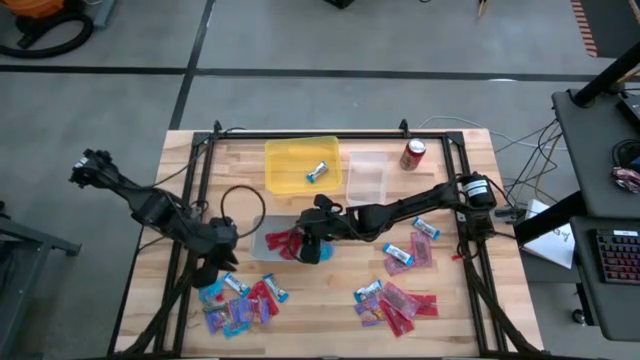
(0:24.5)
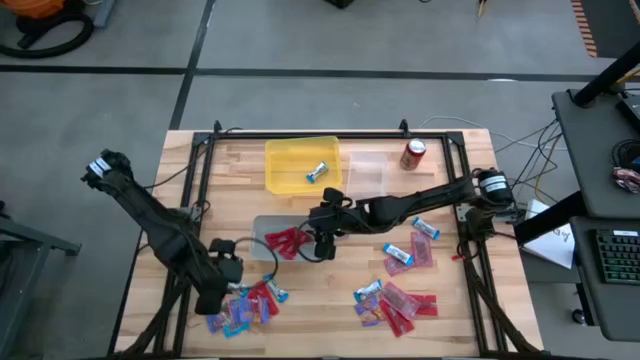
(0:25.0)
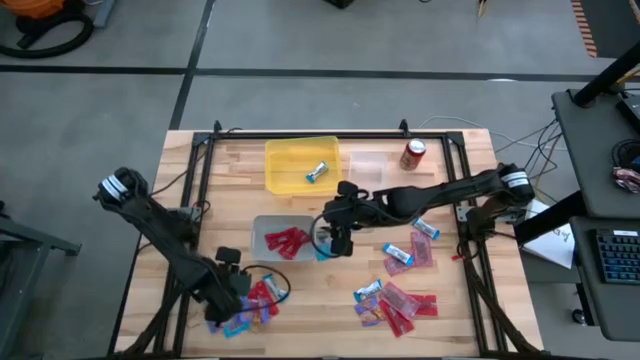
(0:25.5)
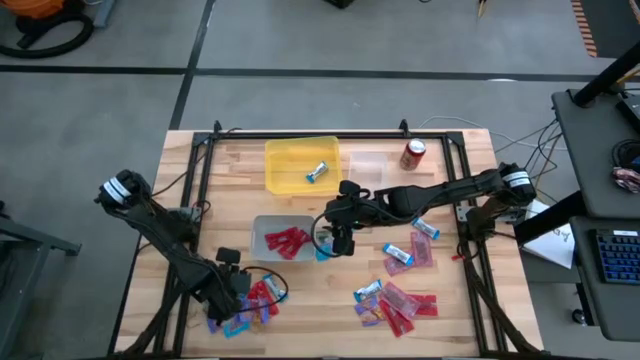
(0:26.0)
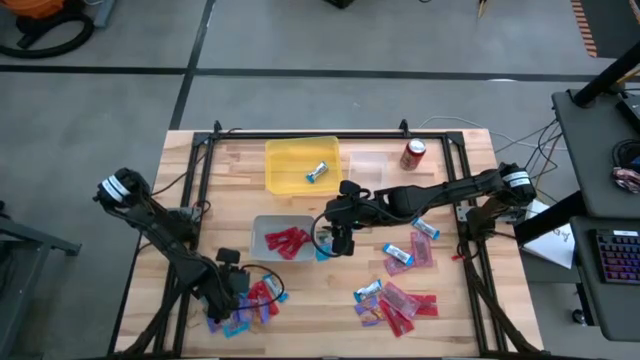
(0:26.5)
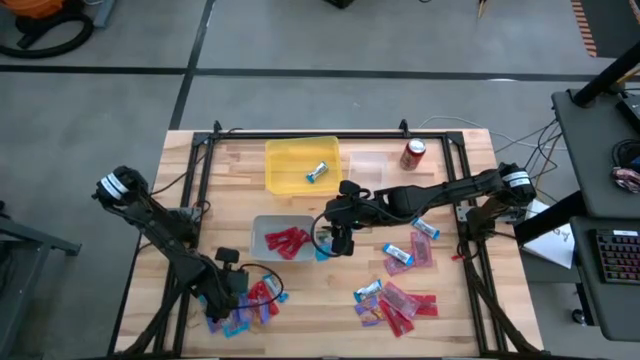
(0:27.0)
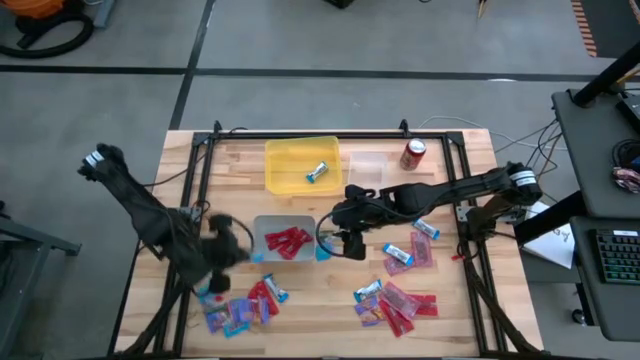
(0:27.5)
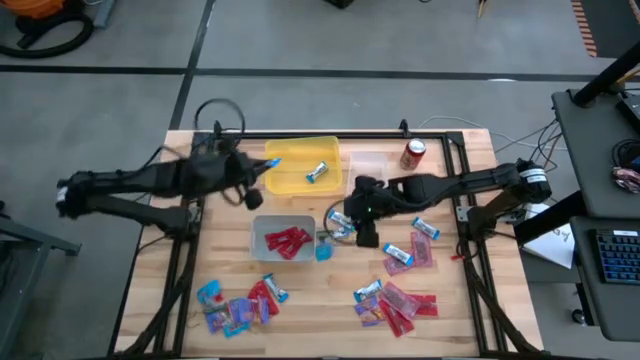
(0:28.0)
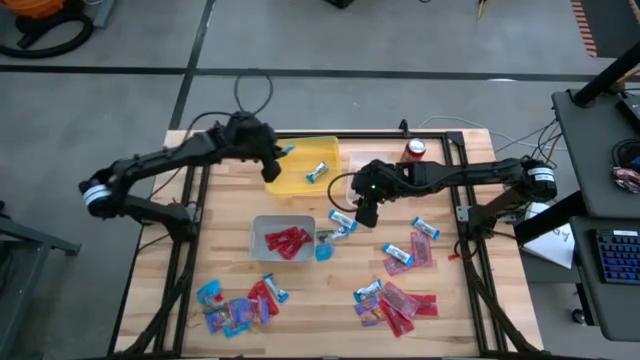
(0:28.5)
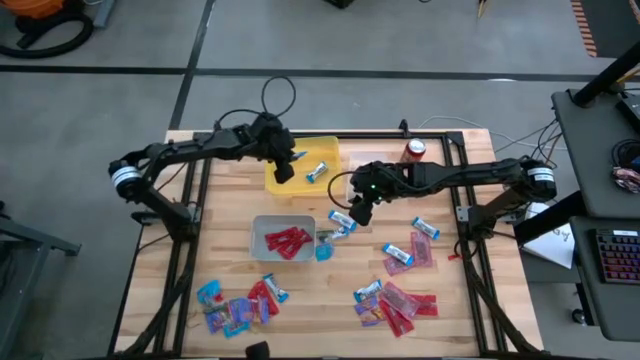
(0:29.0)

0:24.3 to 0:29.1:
Task: Sort candy
Put the white candy into the yellow bin

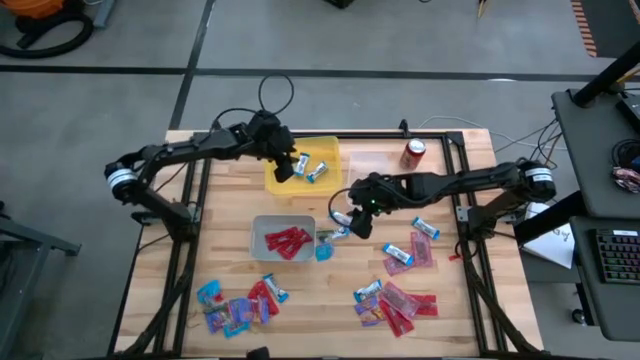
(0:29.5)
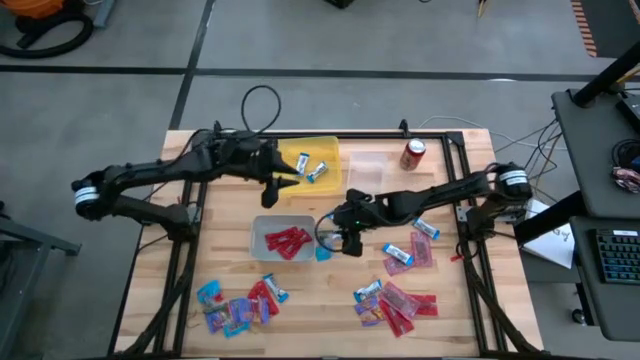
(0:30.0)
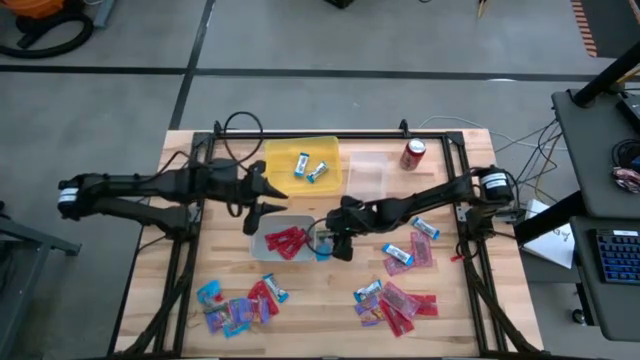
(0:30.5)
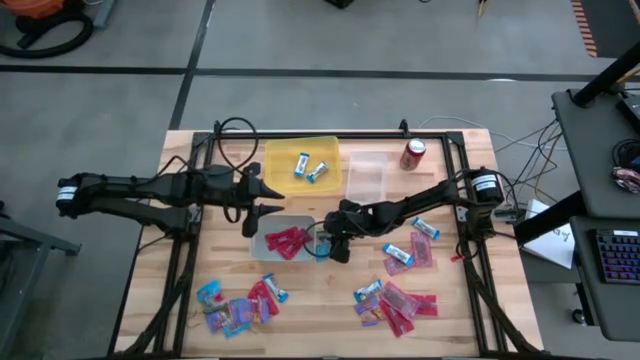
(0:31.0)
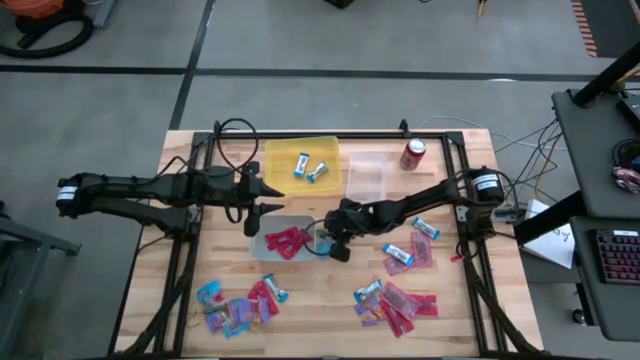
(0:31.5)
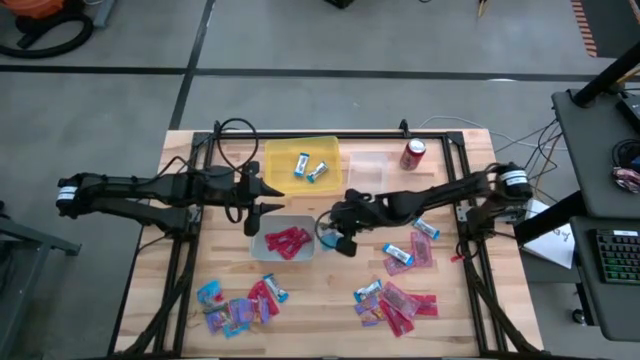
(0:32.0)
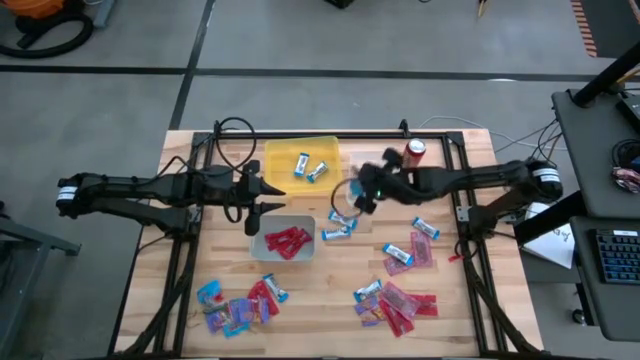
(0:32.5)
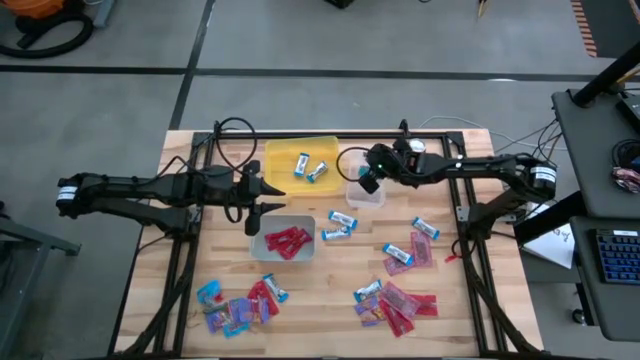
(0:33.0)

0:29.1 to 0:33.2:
Put the blue candy into the transparent bin

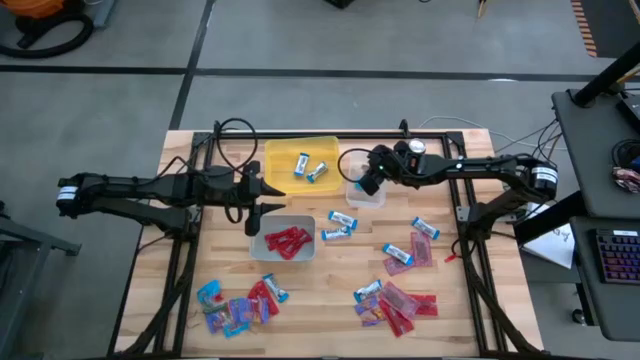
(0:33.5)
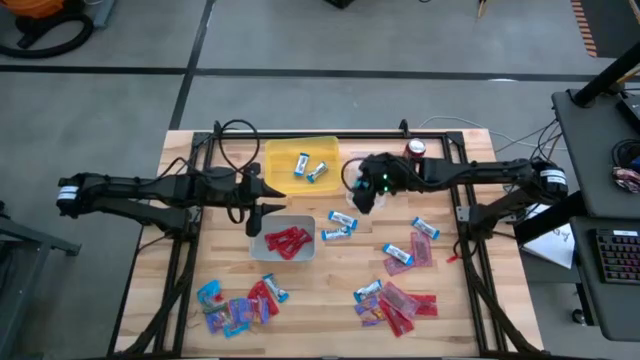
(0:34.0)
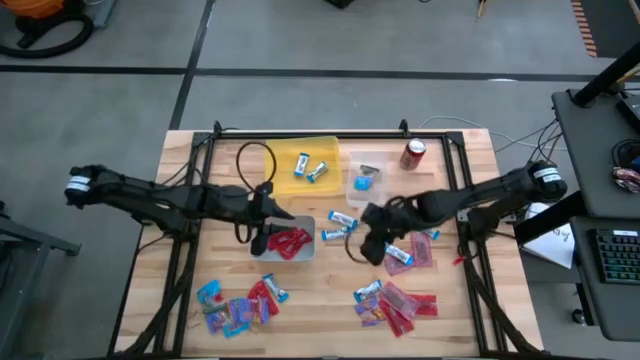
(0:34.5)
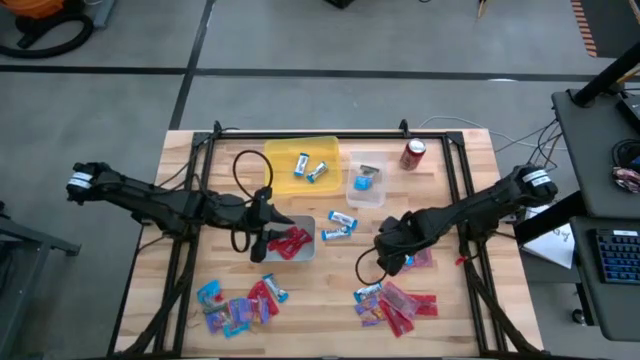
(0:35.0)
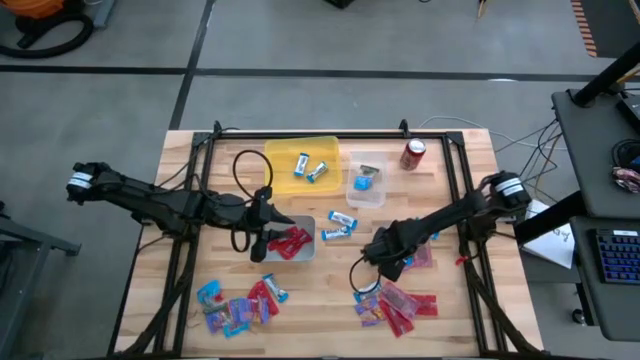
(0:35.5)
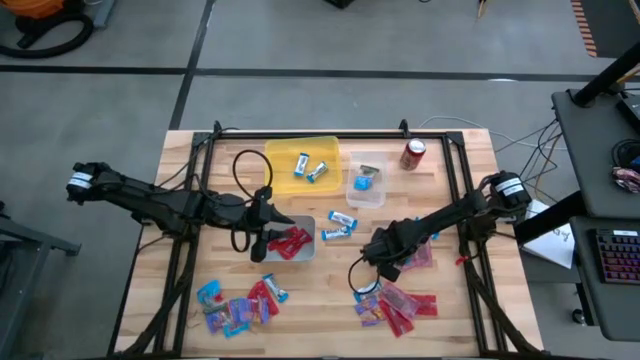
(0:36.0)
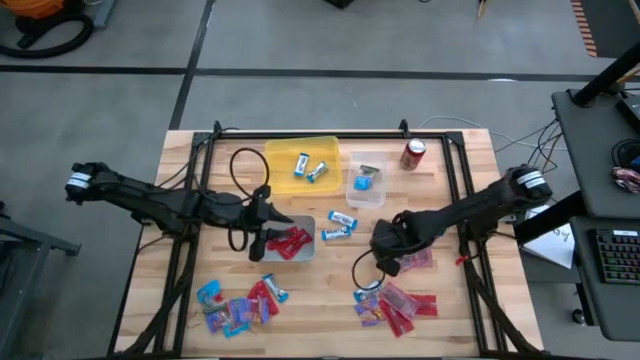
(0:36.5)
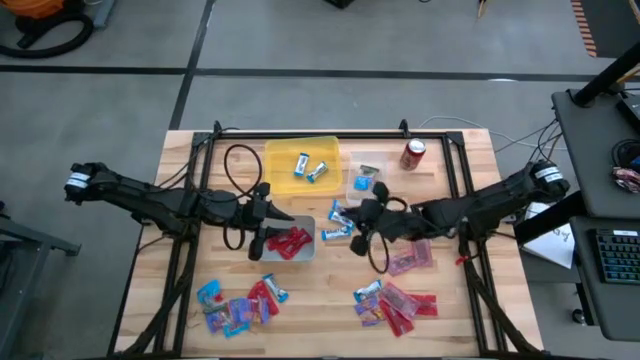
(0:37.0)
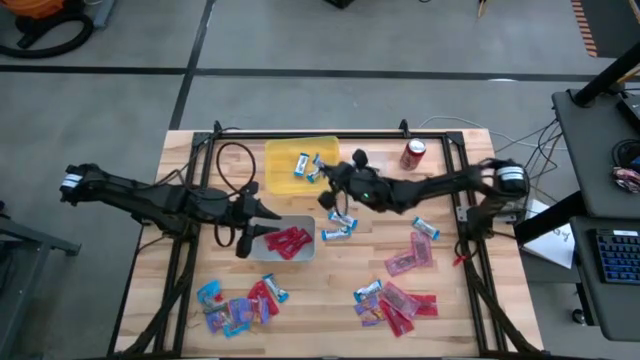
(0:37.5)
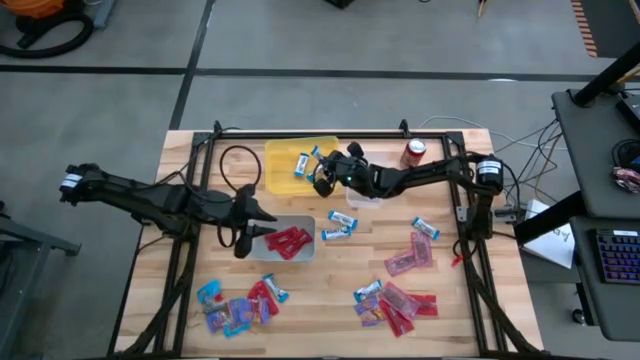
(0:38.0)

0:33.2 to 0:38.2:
Put the white candy into the yellow bin

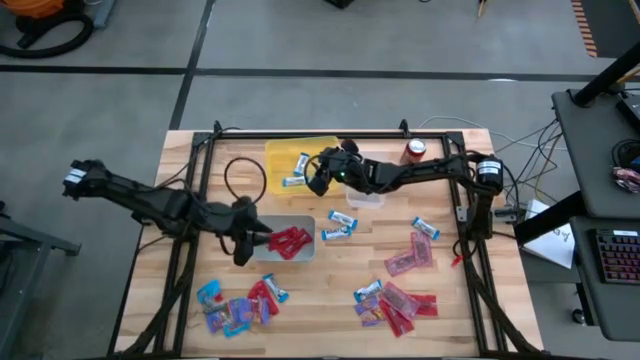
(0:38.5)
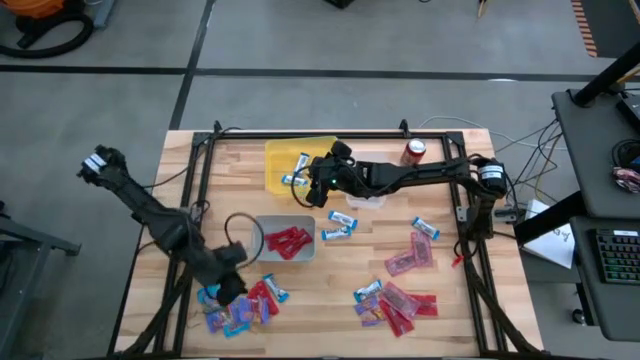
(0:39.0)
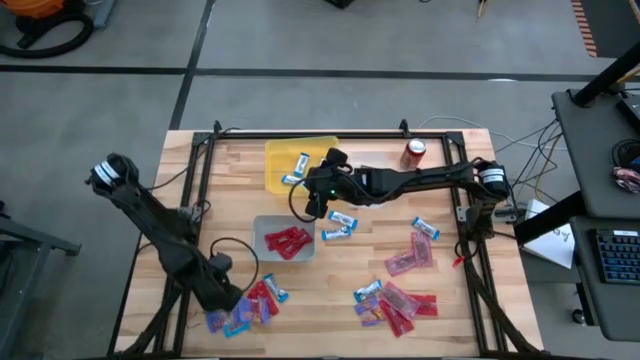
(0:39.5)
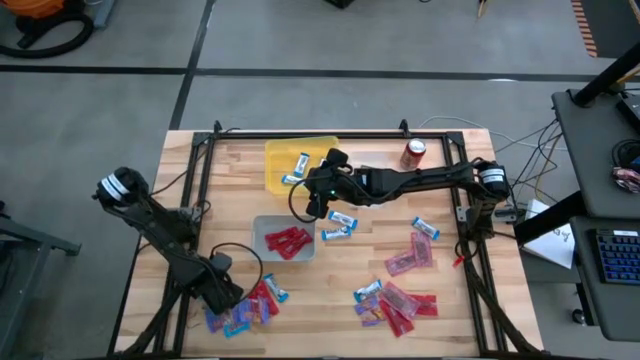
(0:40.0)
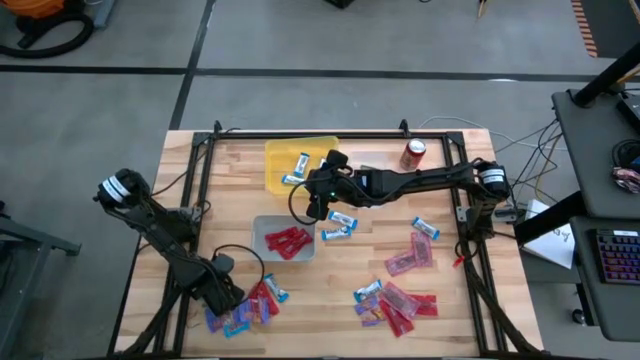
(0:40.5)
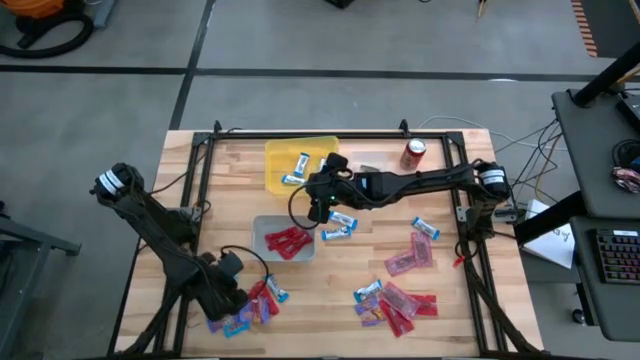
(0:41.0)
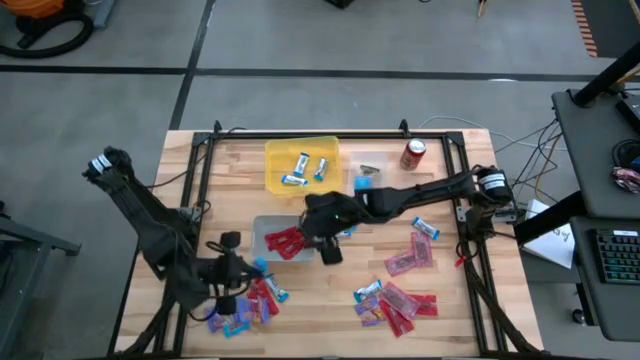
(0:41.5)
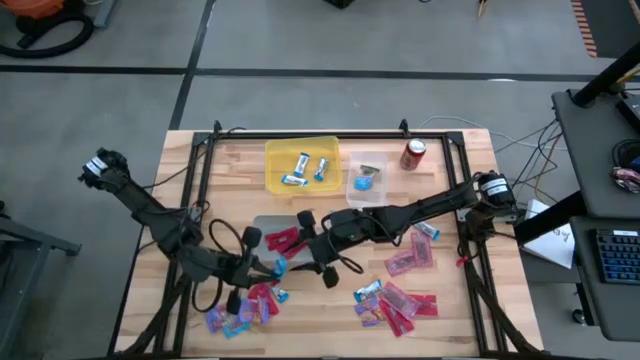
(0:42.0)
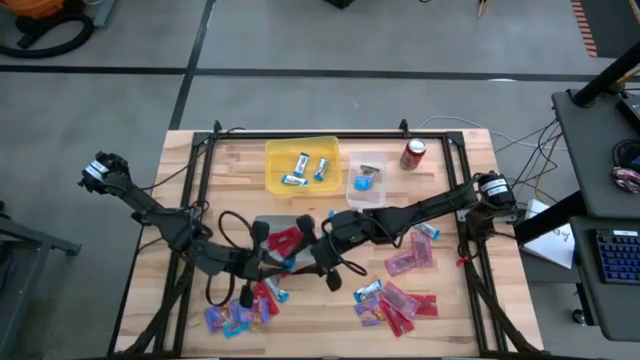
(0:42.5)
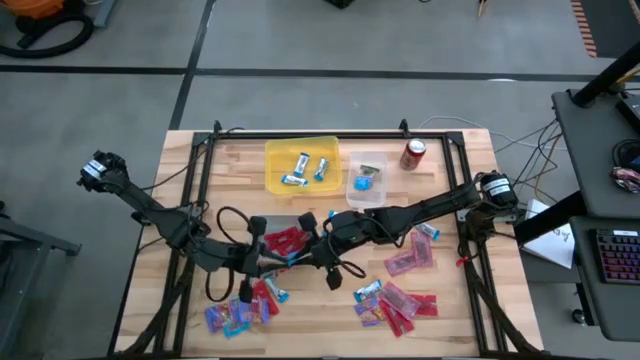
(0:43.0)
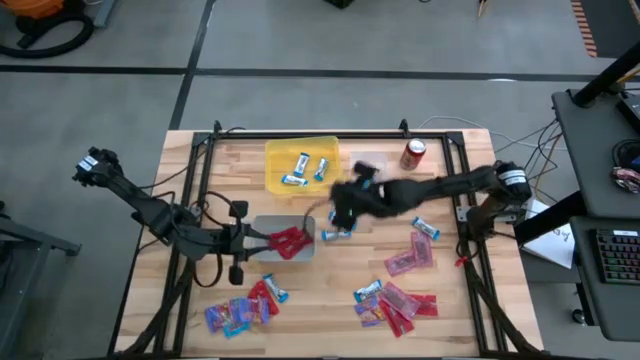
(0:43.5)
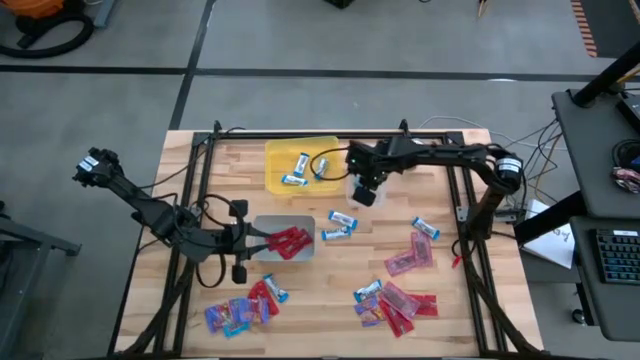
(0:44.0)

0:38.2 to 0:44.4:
Put the blue candy into the transparent bin
